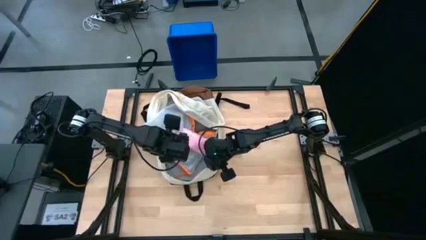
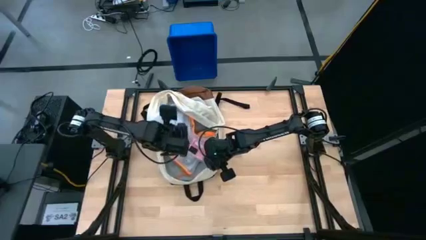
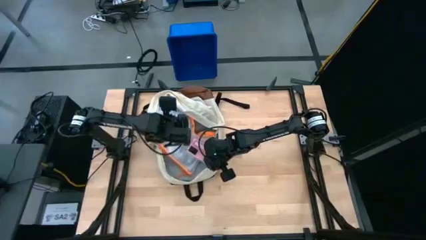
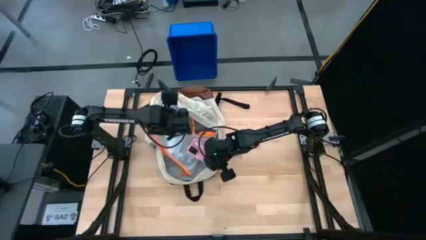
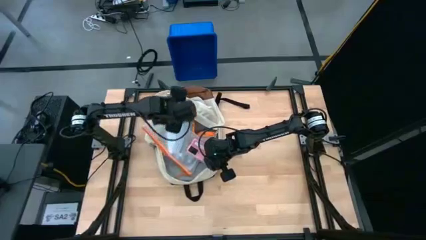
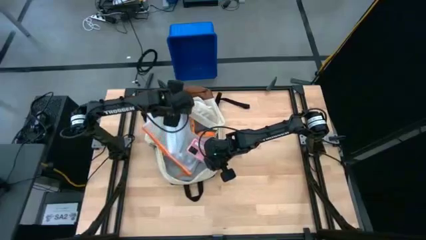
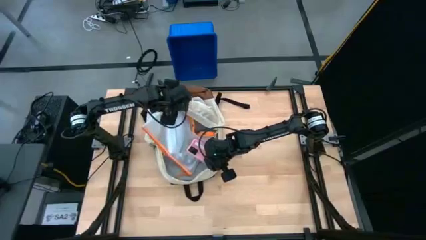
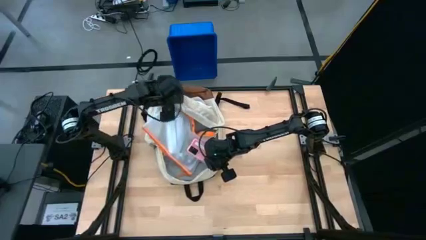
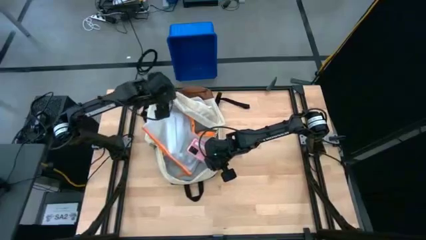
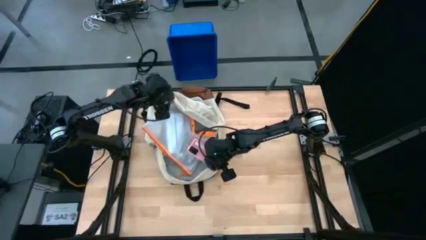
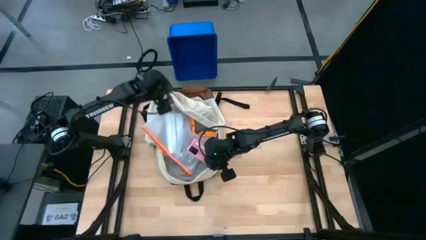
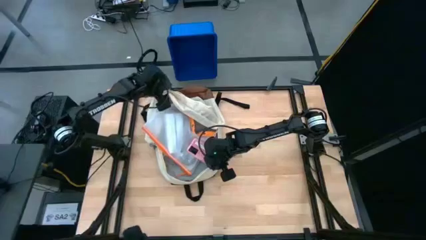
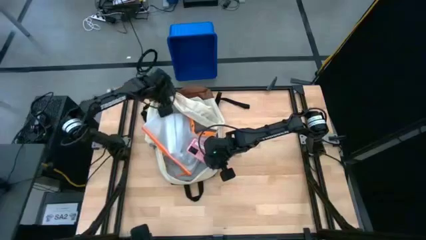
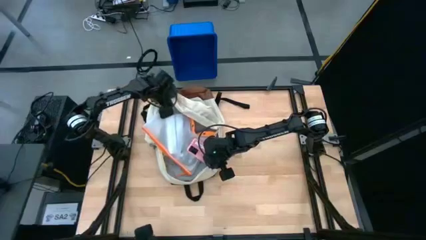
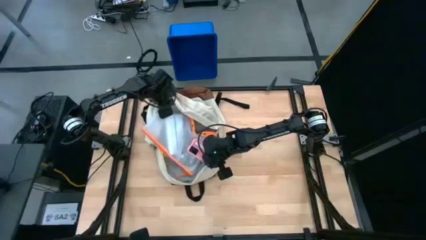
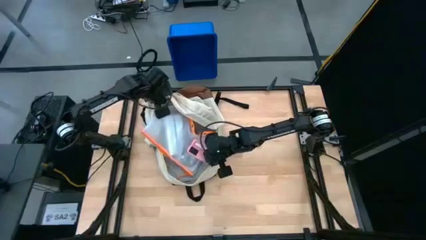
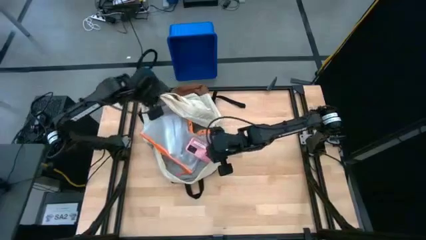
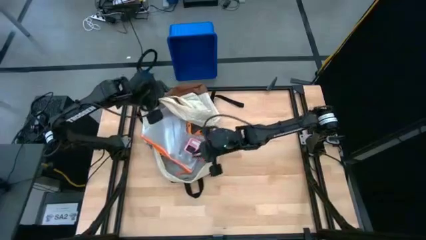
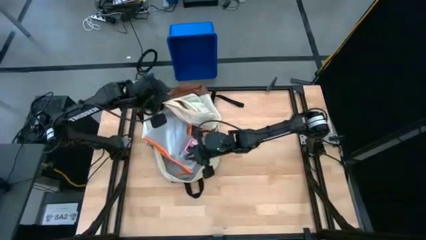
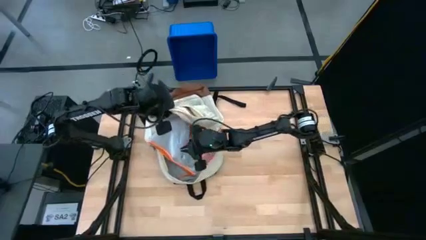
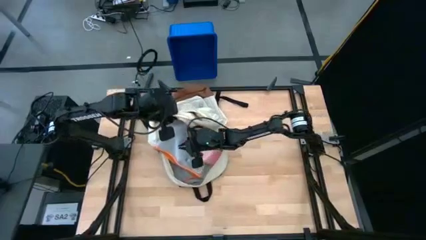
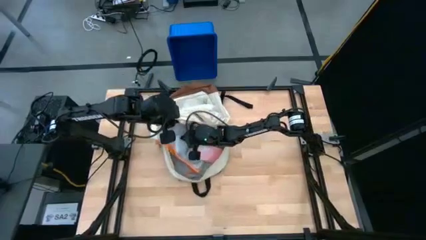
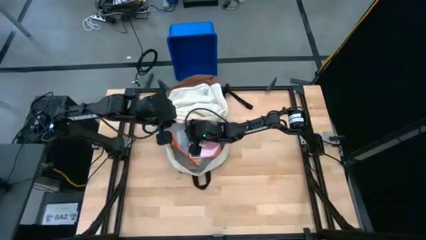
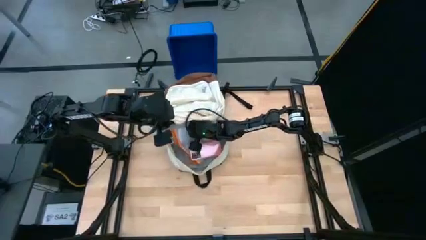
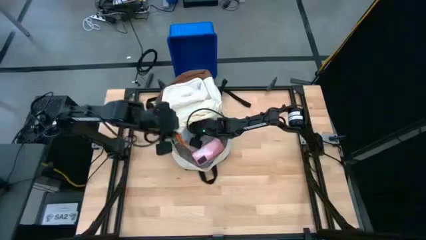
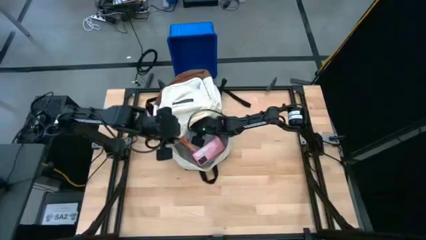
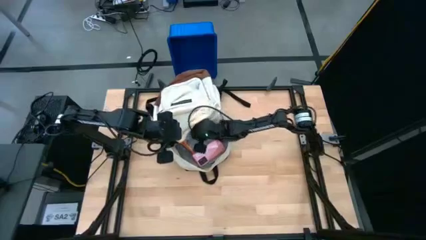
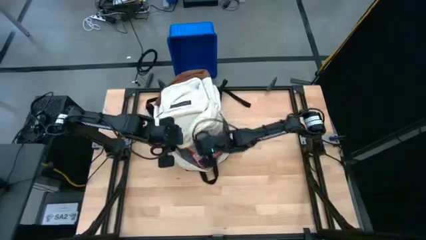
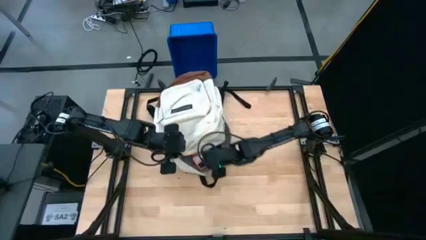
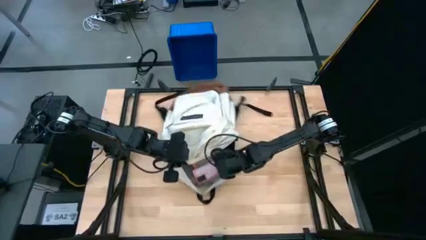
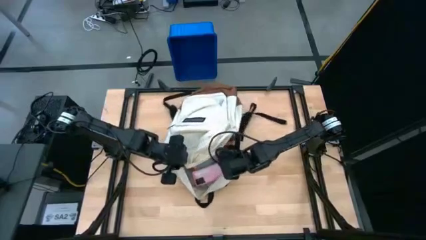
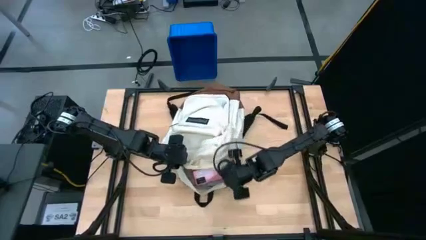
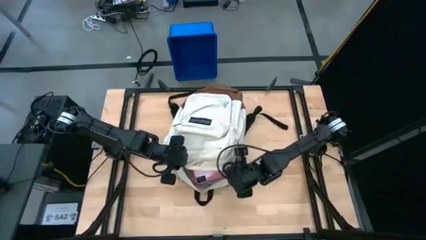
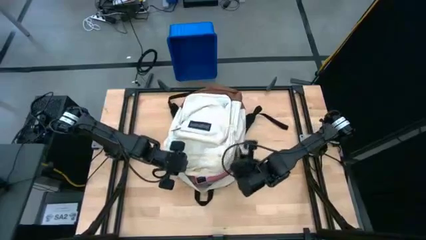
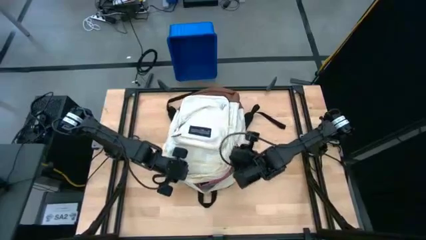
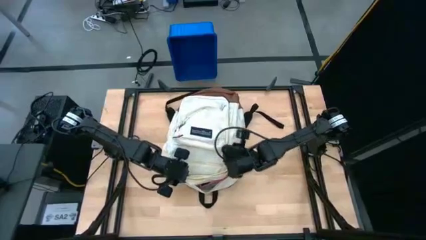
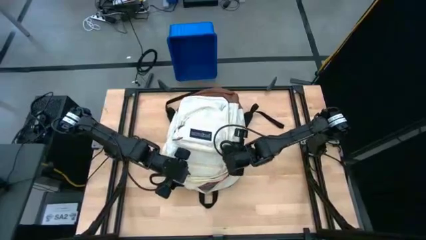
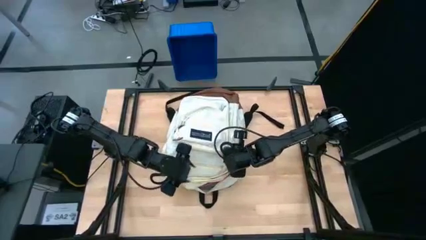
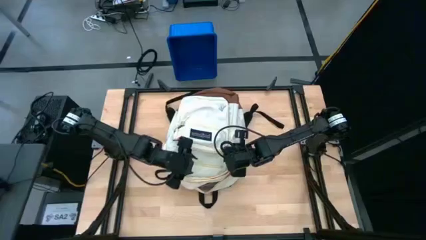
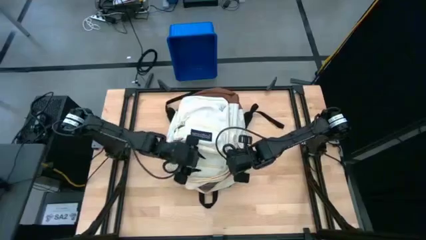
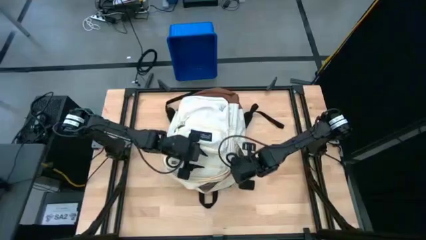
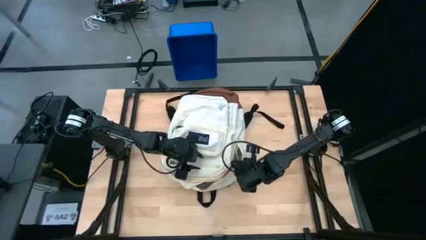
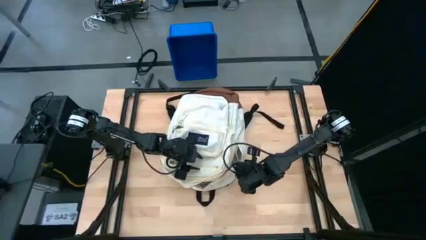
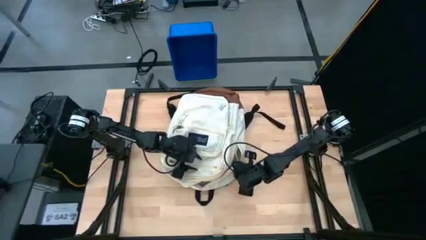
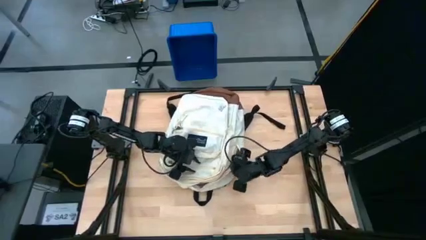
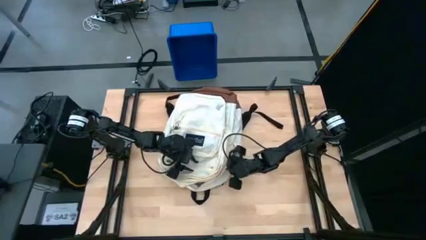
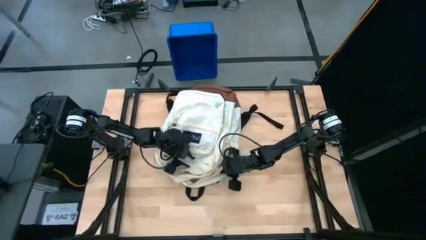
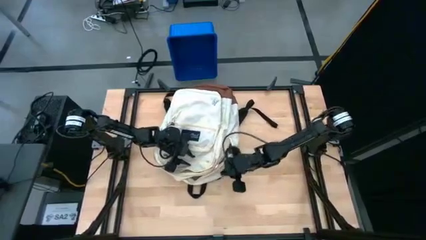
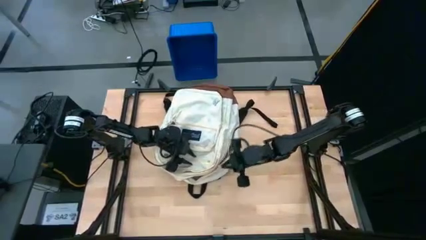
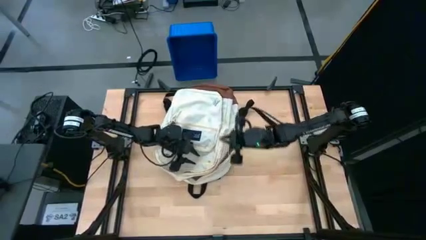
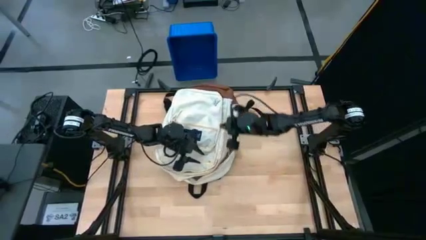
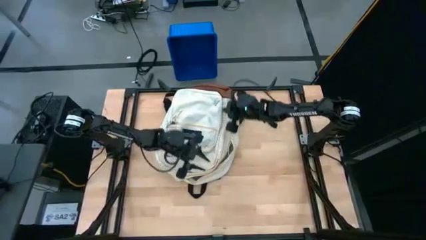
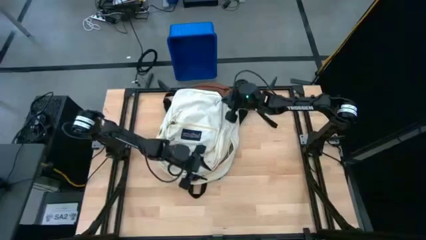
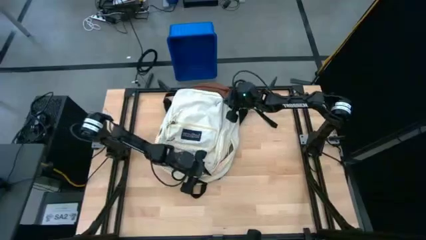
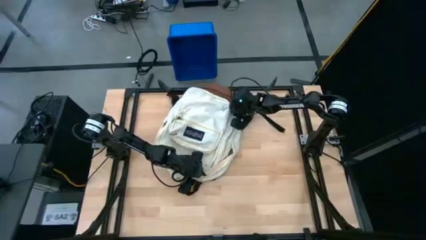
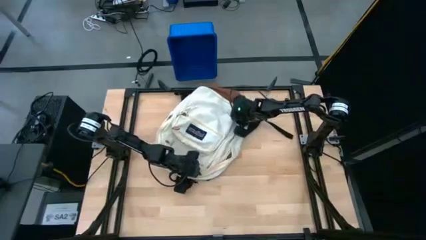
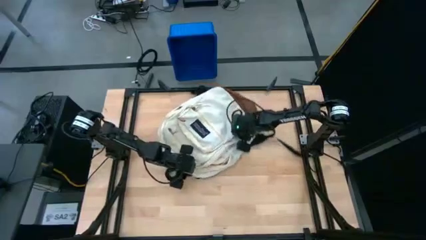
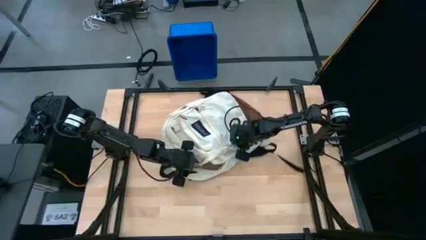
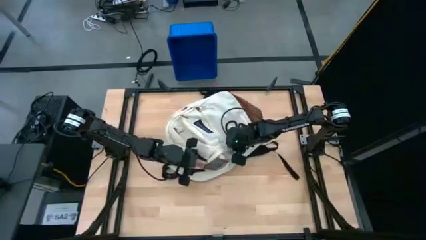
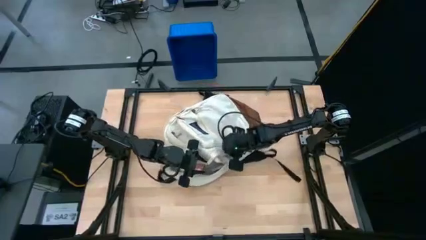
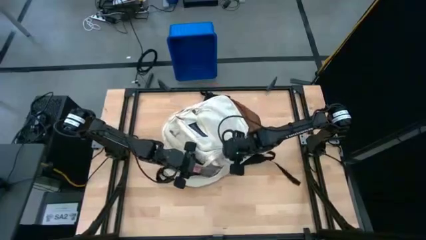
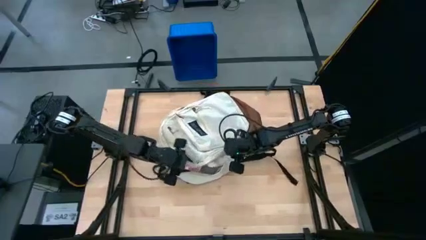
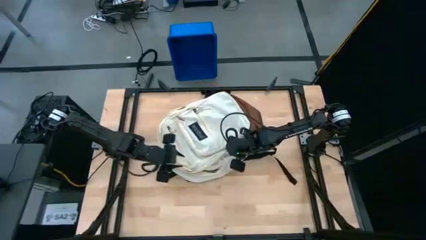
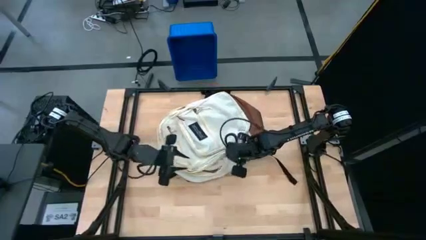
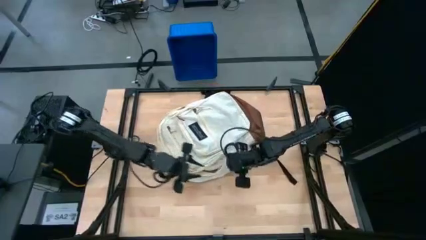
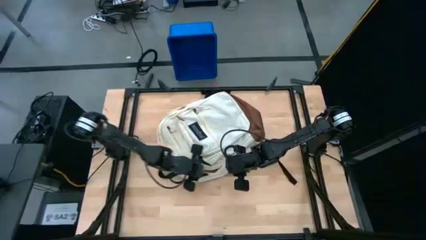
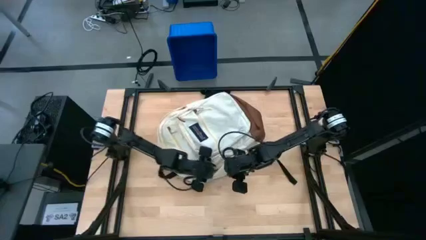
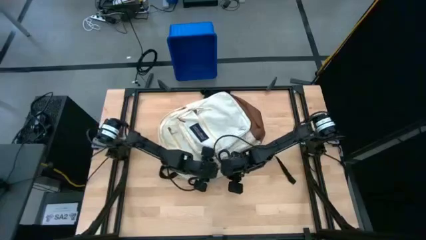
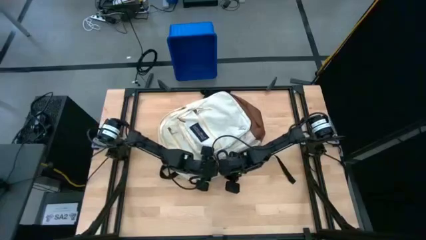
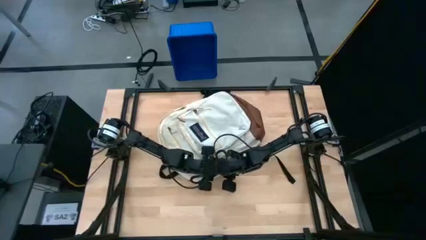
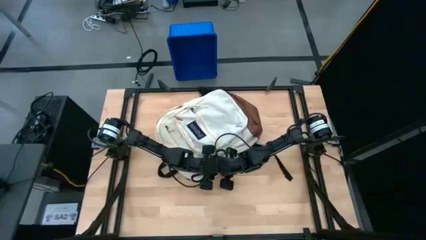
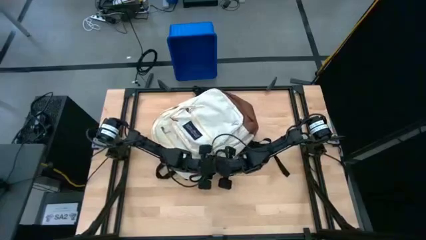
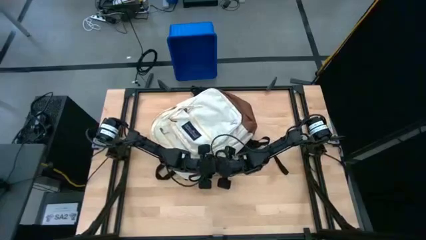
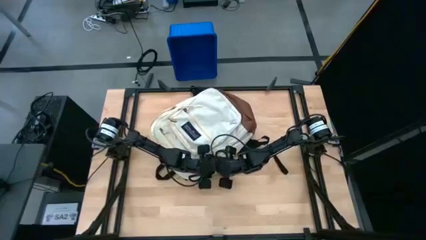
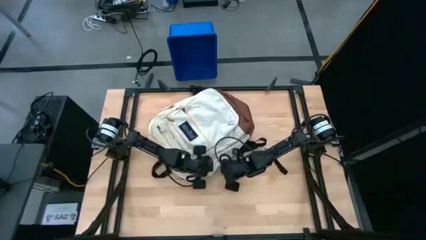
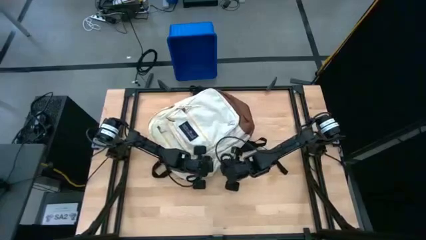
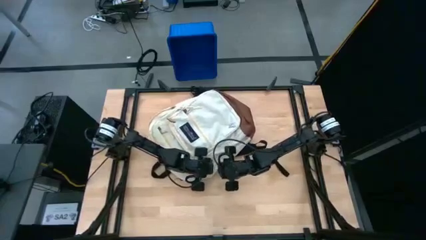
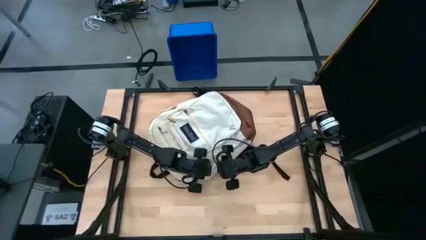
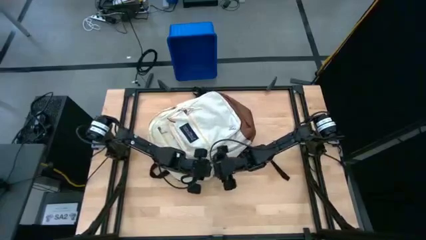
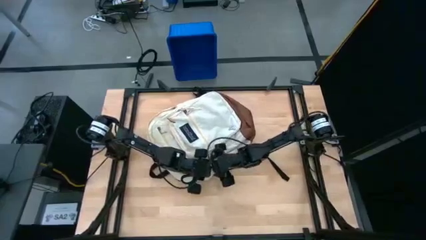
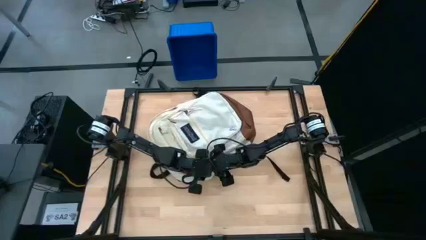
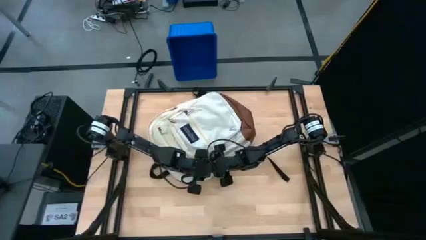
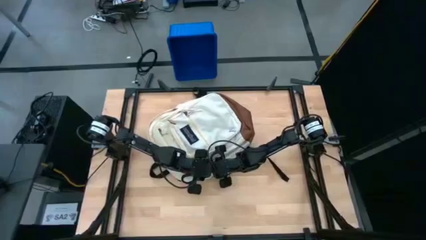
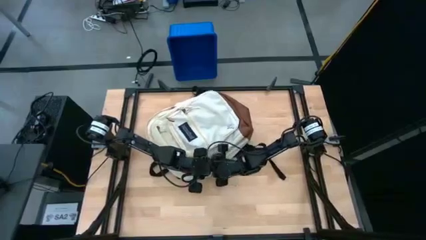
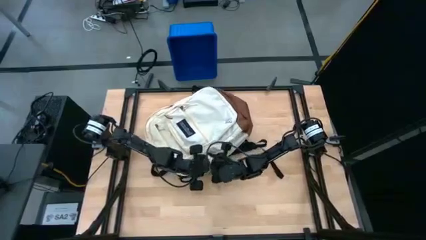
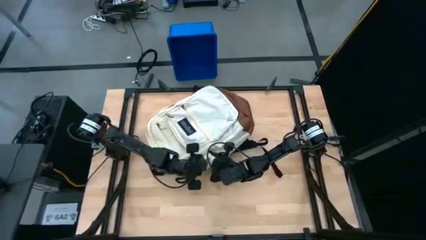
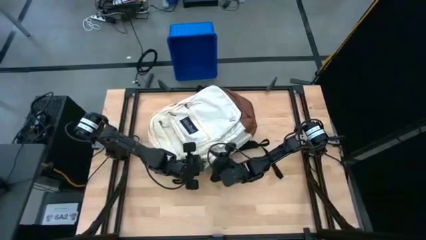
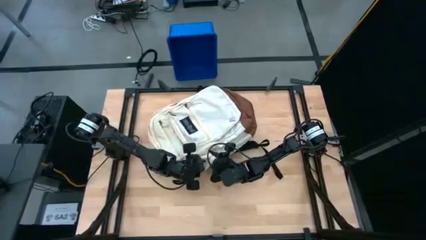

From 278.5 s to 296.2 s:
Task: Unpack backpack
Close the white backpack
